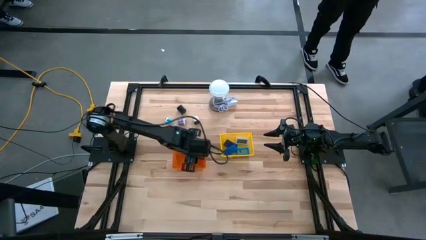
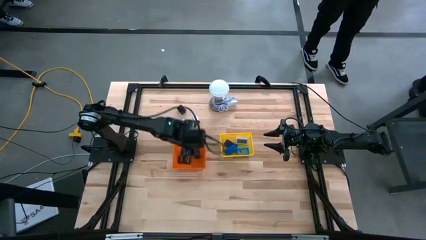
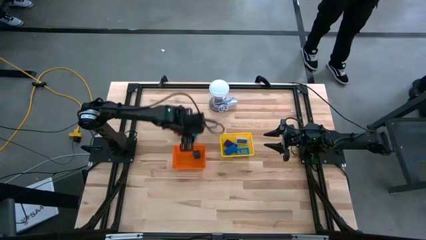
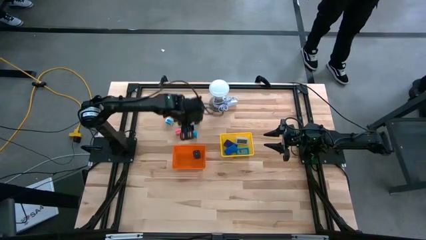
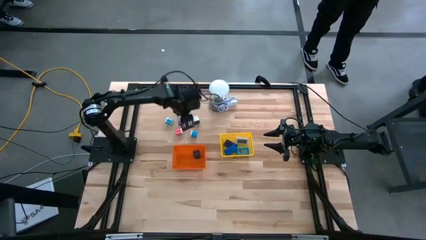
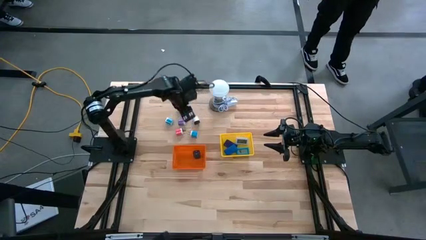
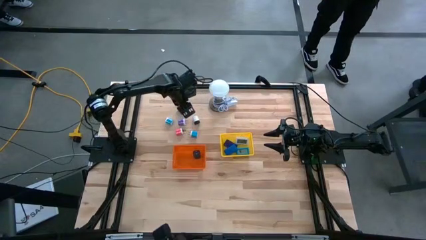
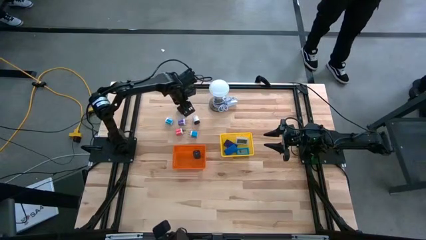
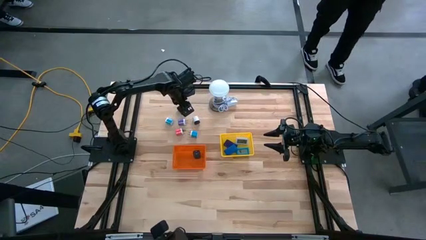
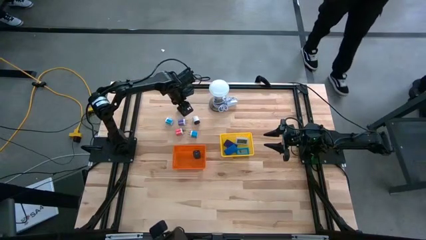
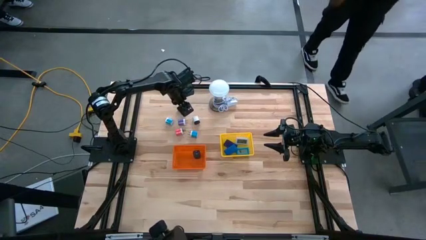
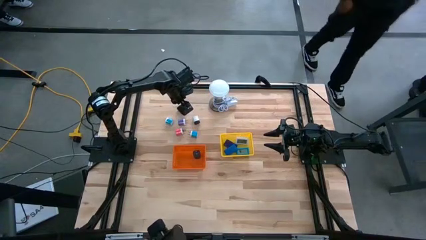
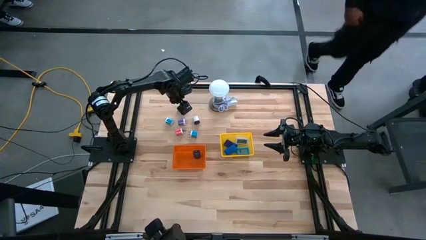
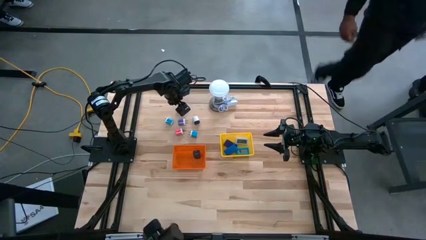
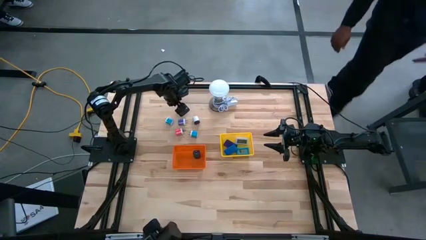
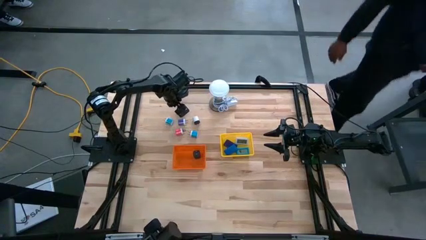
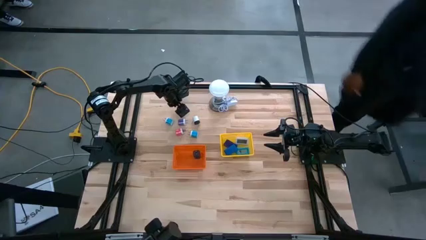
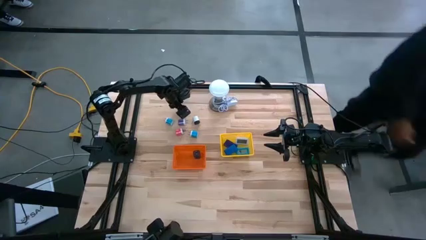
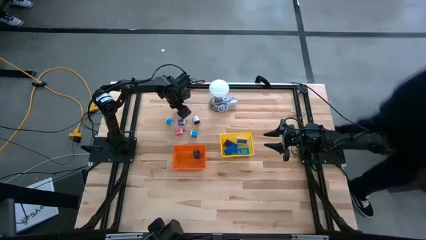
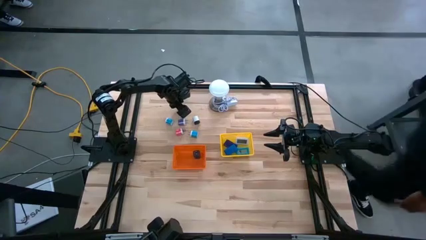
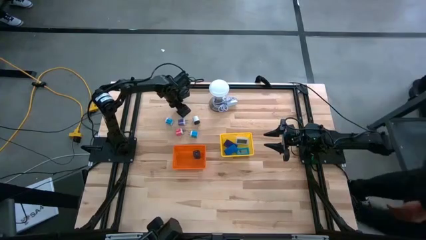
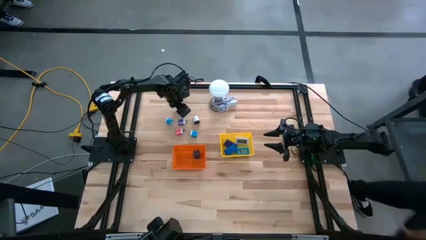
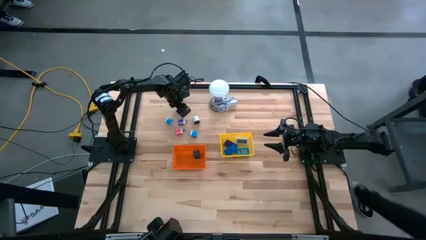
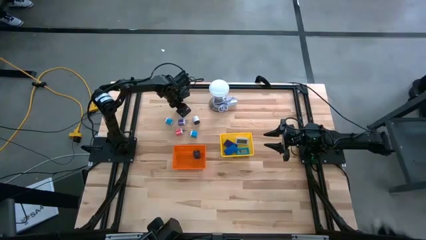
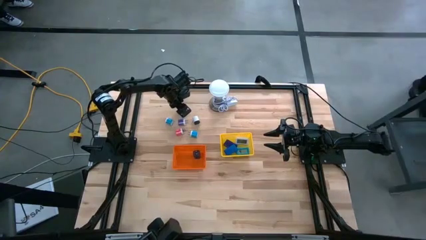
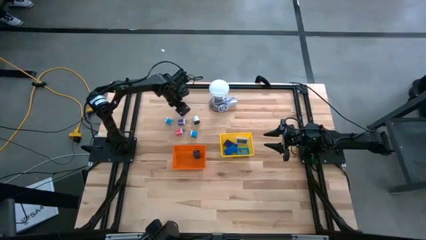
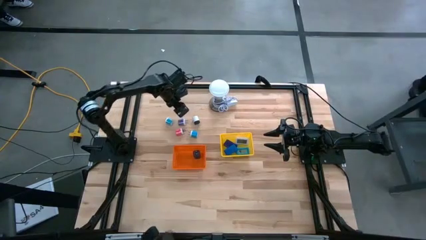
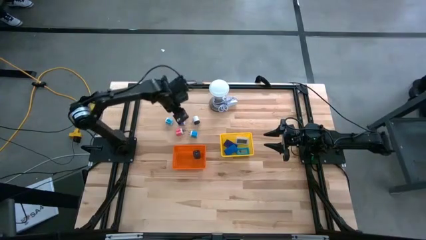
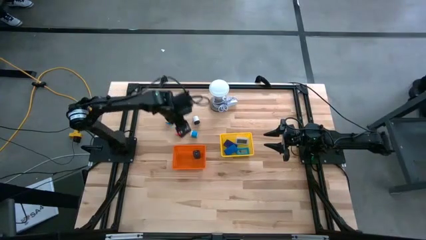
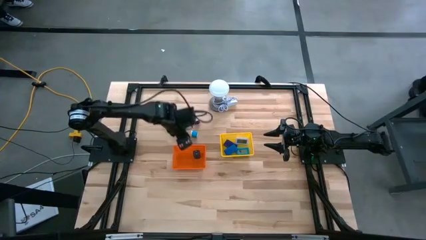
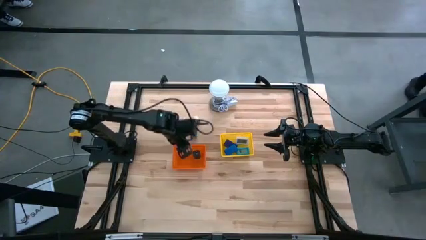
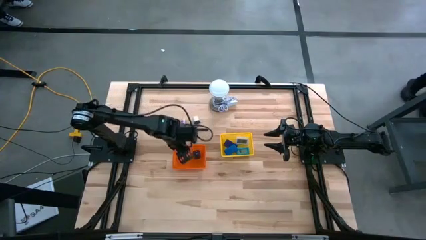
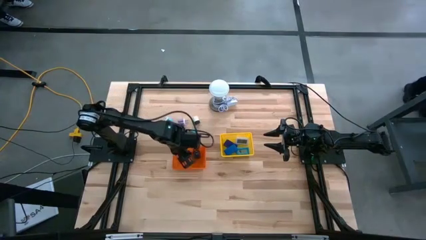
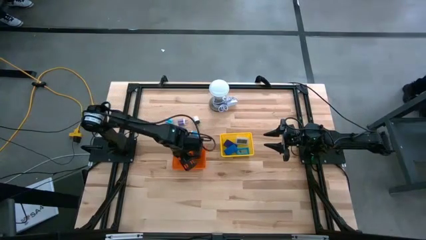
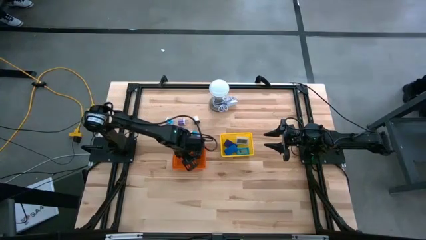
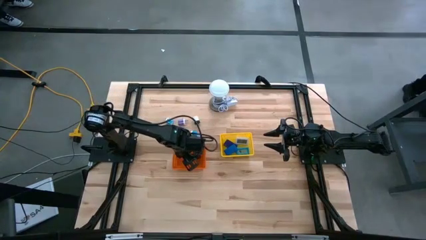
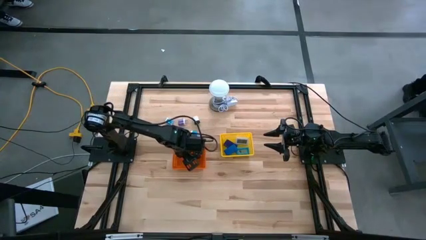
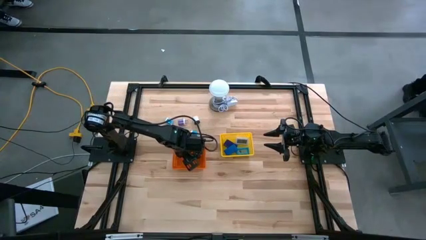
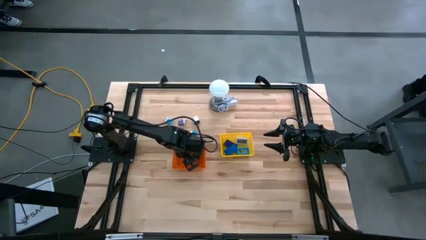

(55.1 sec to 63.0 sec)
Task: Pick & Place Office items
Put the black charger adapter into the orange bin

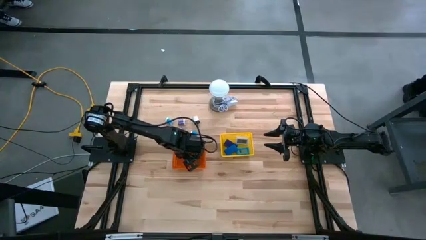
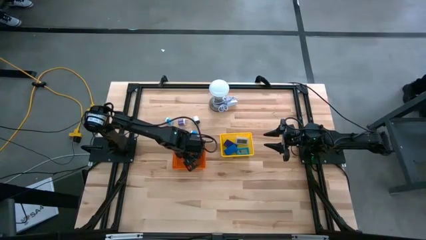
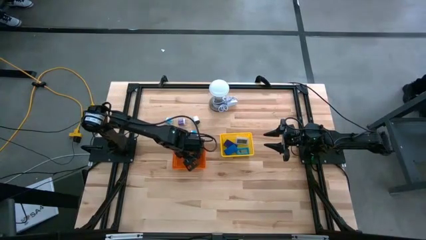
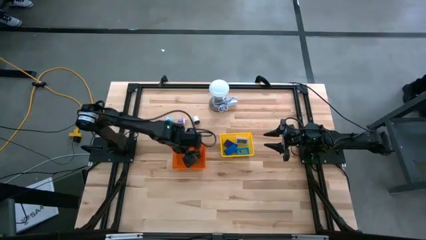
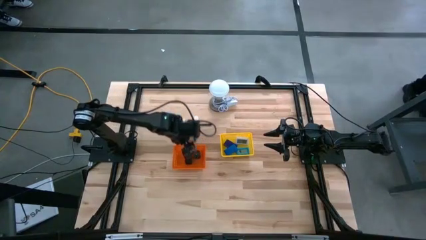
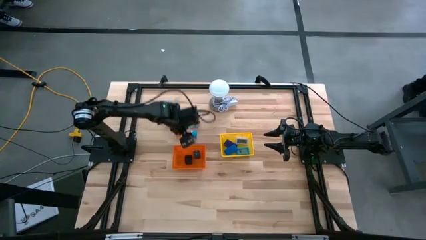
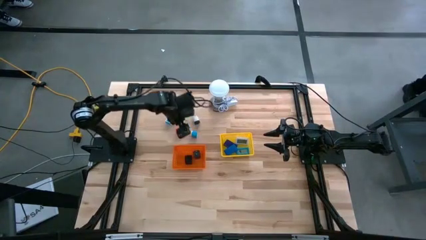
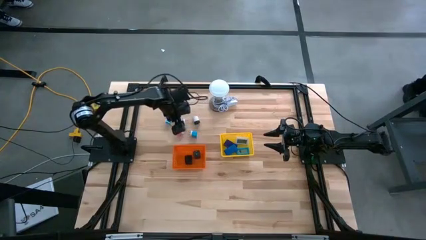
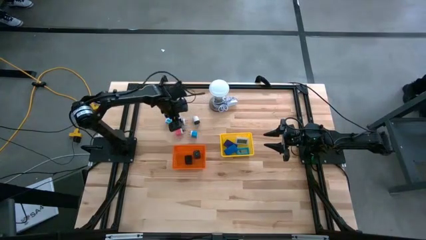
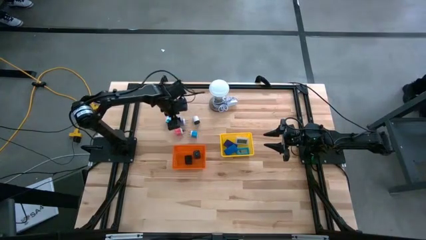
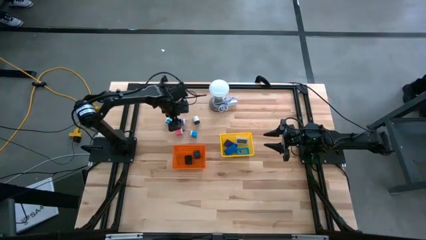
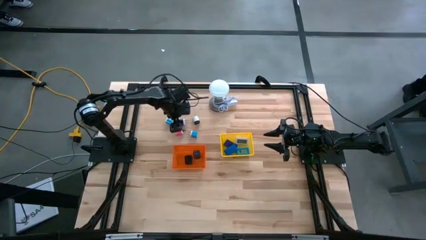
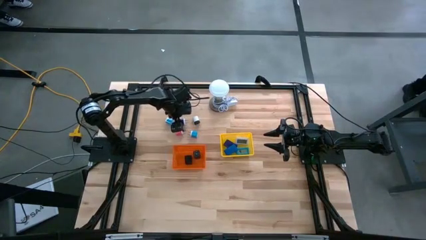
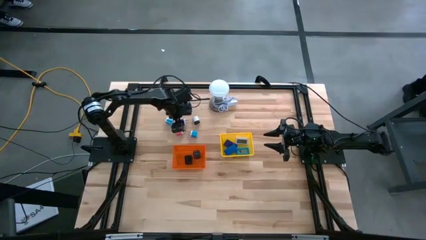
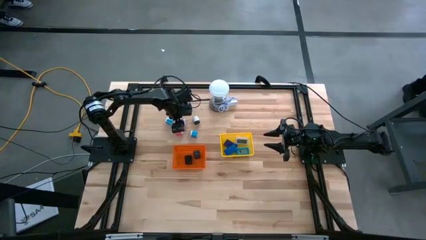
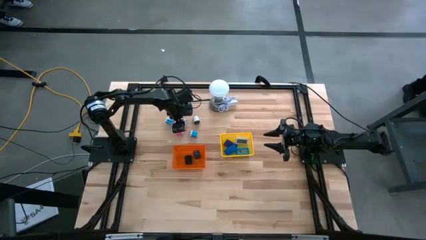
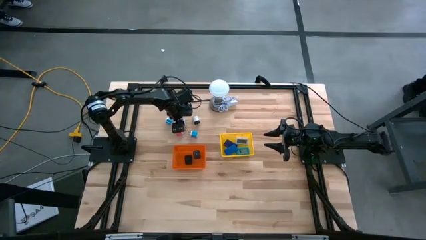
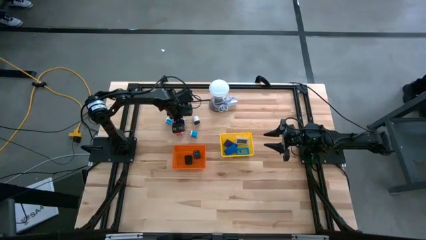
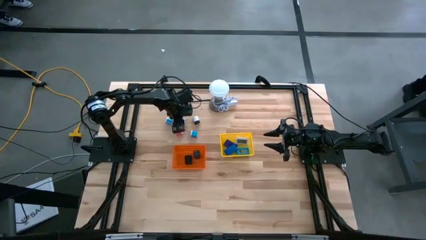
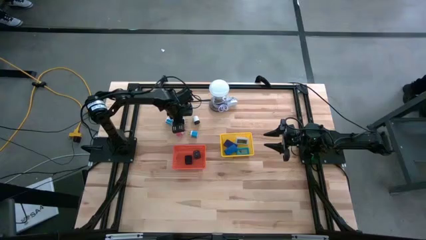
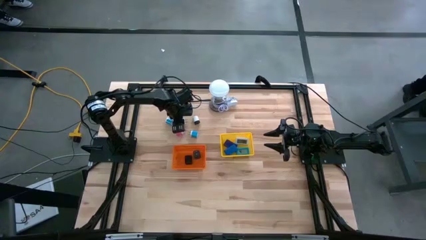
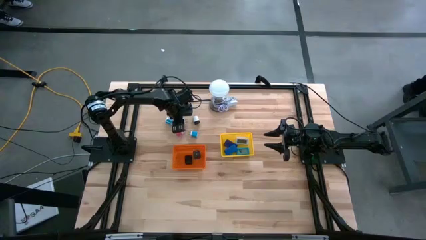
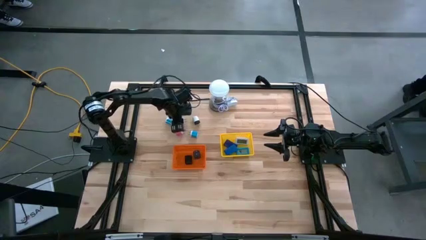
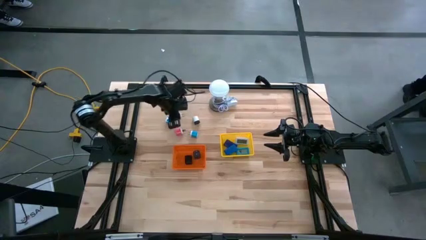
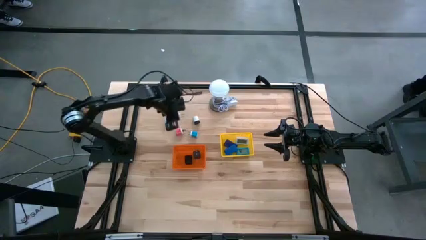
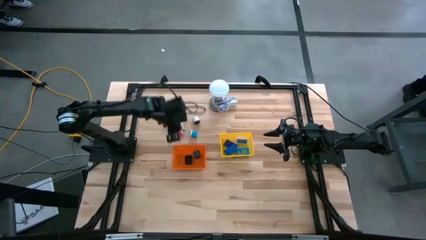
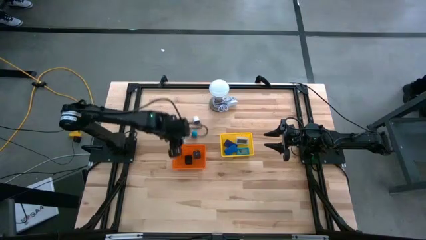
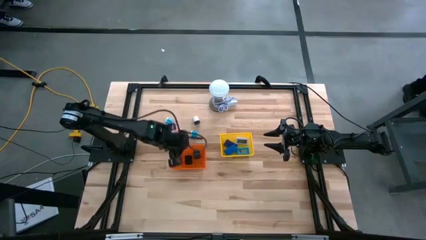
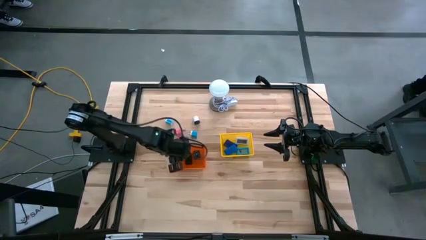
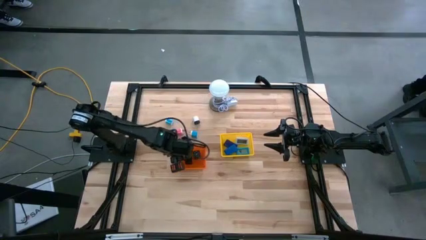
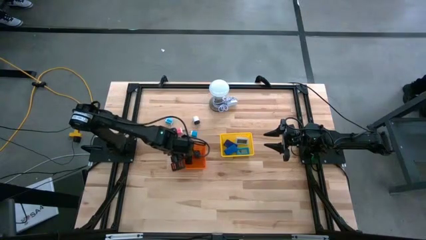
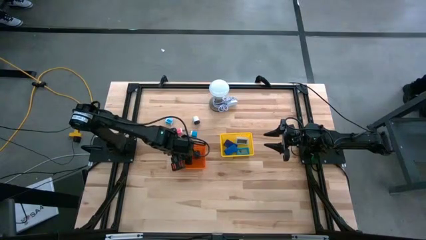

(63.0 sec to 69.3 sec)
Put the dark blue charger adapter into the orange bin

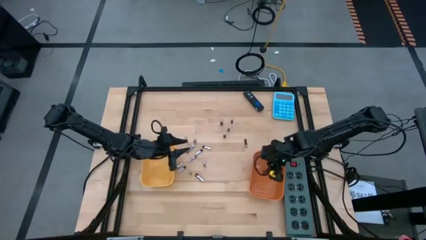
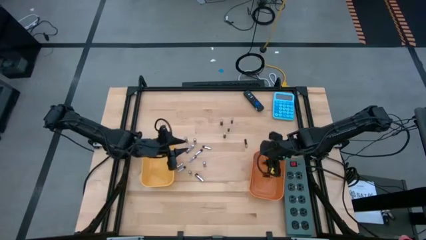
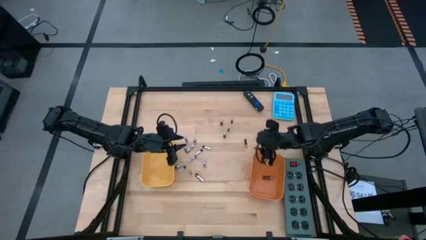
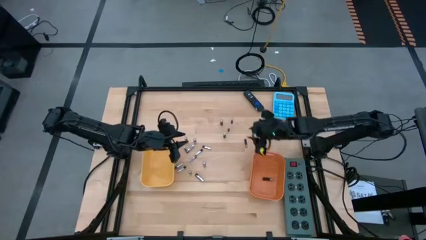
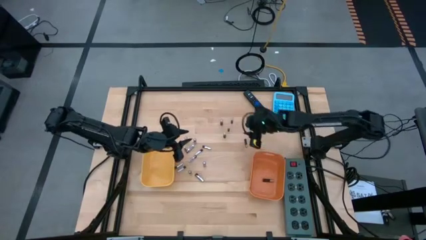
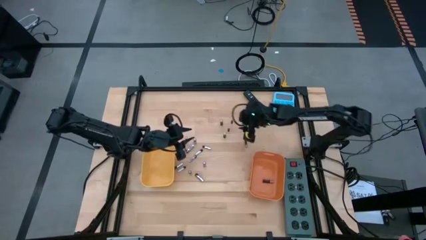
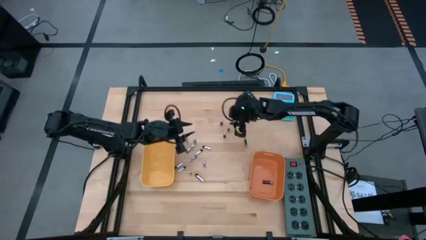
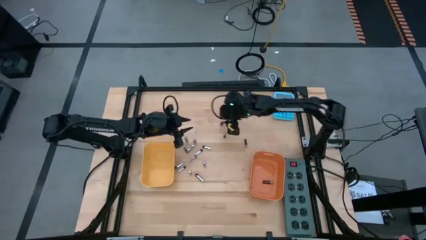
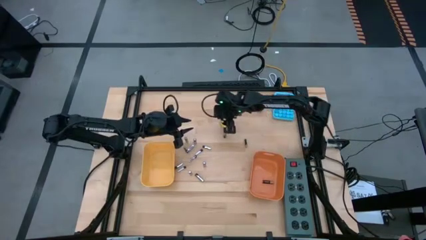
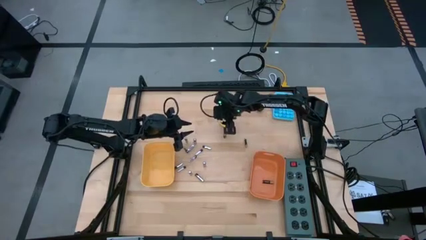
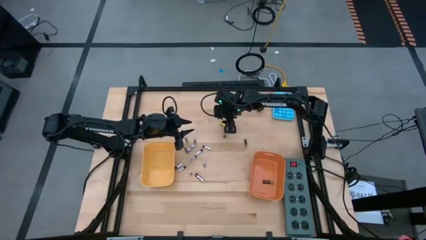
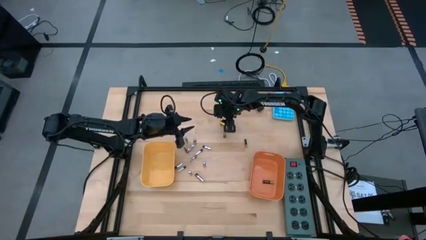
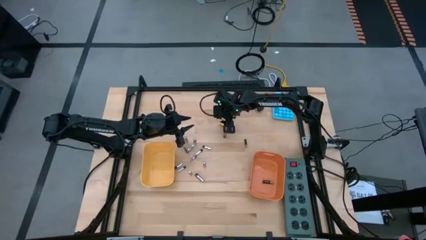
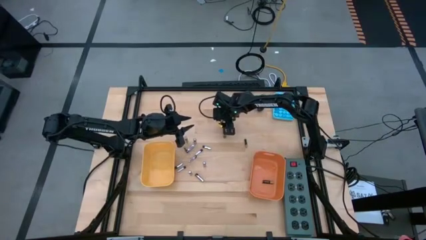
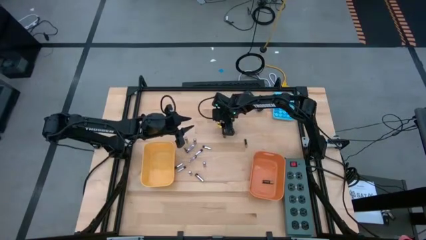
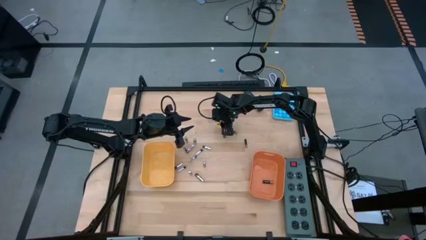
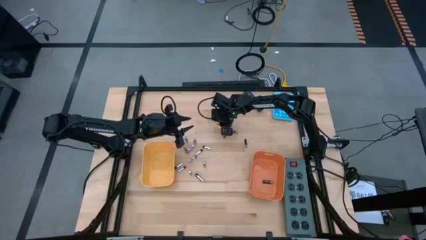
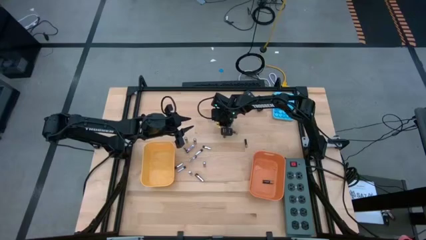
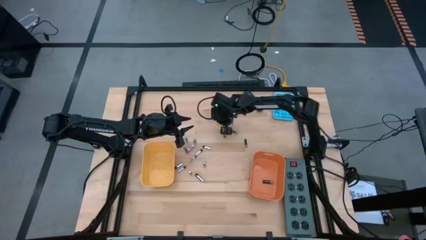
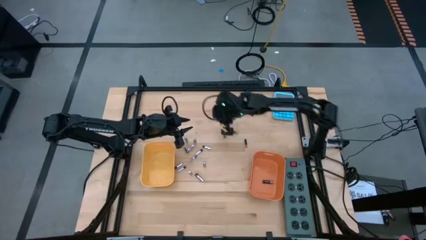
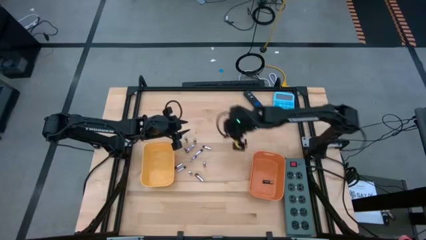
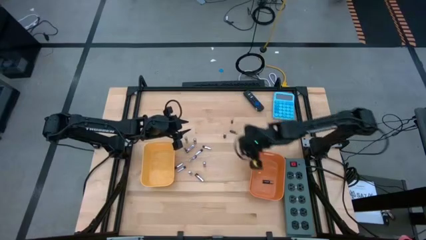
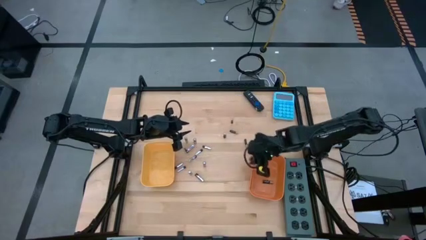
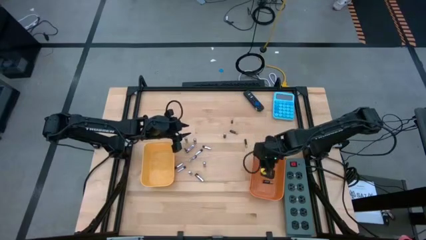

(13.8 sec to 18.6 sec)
Task: Sort batteries
Put the black battery into the orange bin
